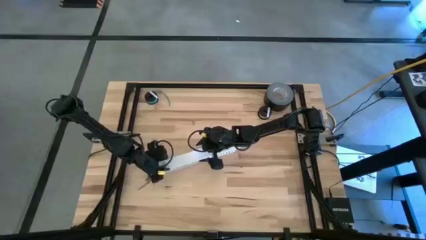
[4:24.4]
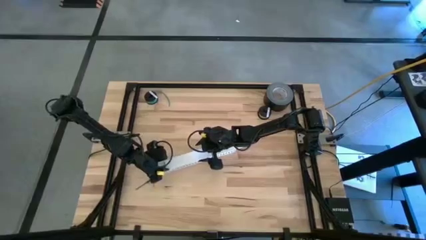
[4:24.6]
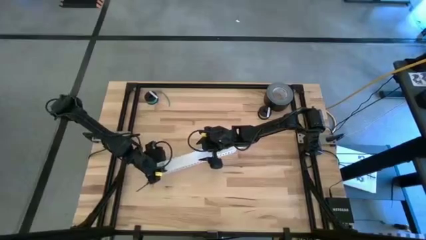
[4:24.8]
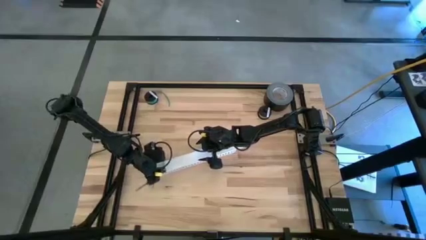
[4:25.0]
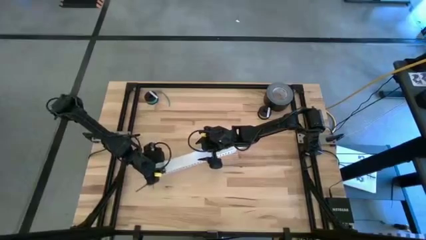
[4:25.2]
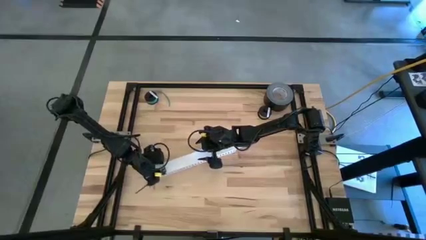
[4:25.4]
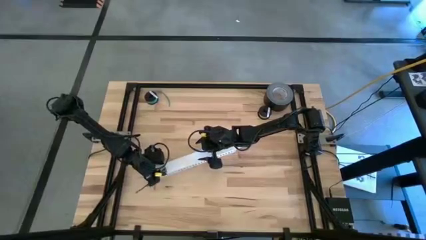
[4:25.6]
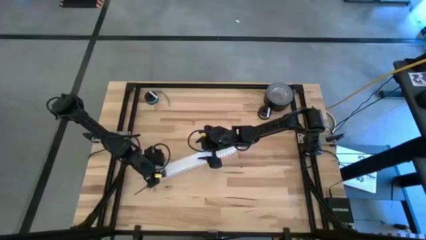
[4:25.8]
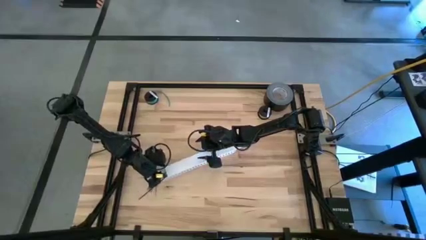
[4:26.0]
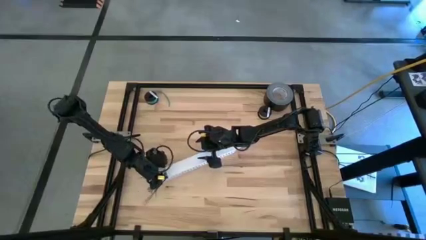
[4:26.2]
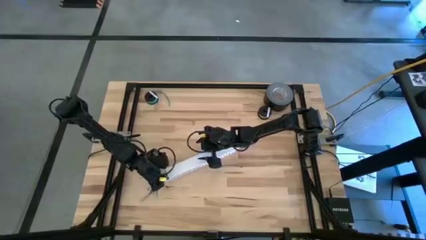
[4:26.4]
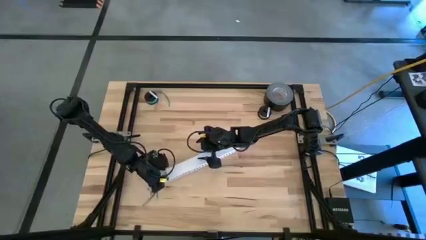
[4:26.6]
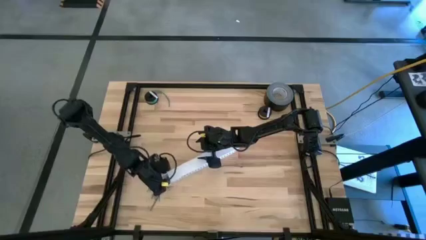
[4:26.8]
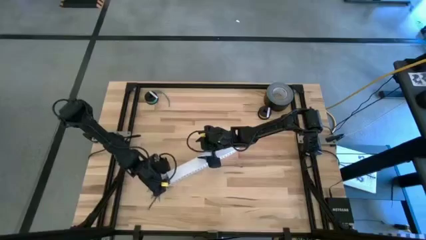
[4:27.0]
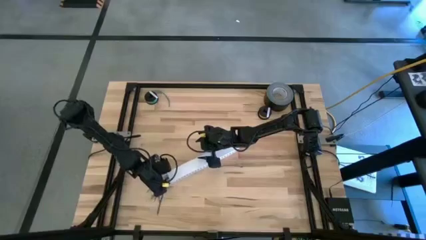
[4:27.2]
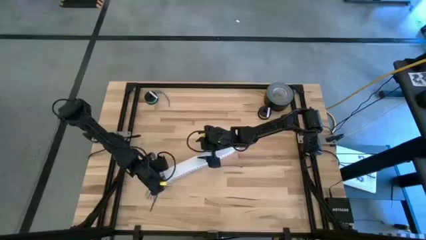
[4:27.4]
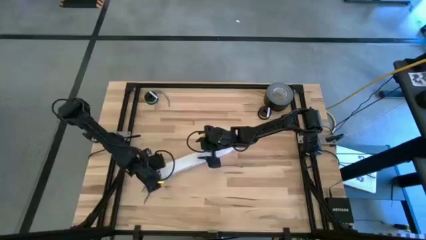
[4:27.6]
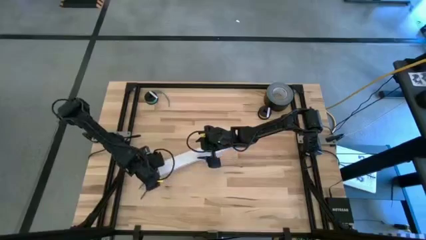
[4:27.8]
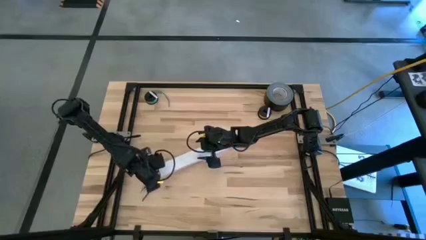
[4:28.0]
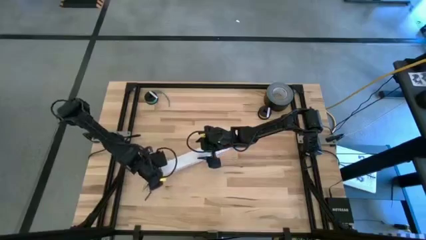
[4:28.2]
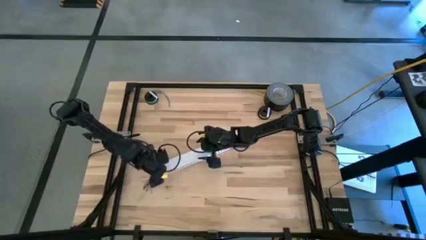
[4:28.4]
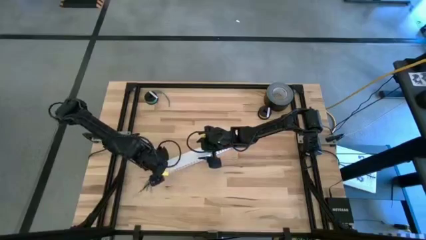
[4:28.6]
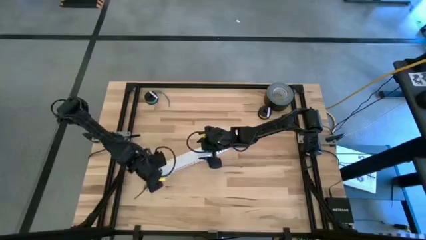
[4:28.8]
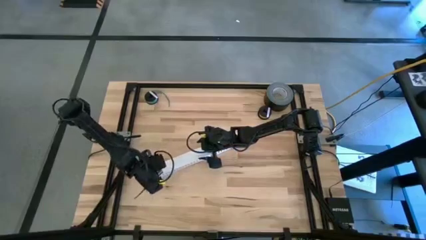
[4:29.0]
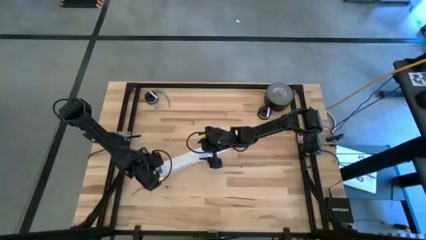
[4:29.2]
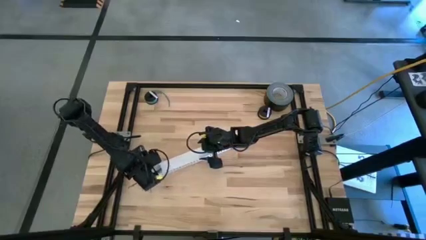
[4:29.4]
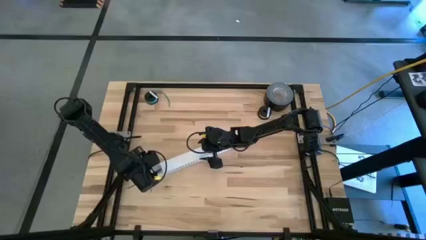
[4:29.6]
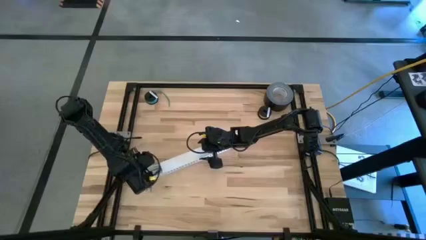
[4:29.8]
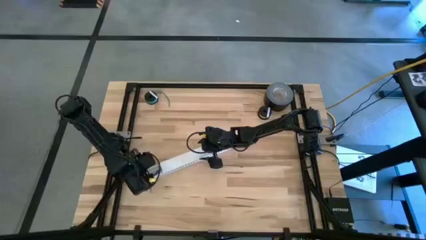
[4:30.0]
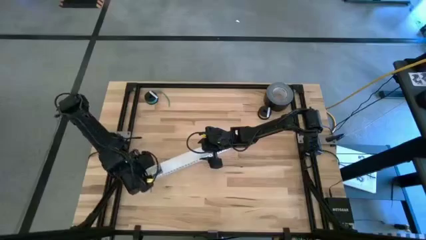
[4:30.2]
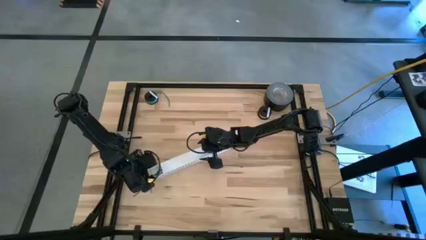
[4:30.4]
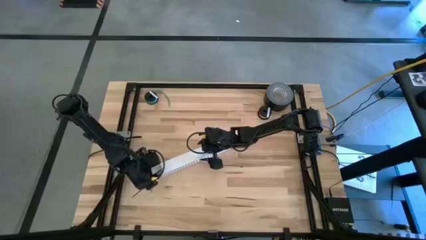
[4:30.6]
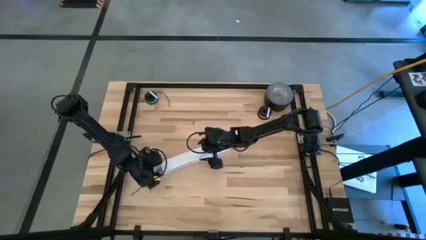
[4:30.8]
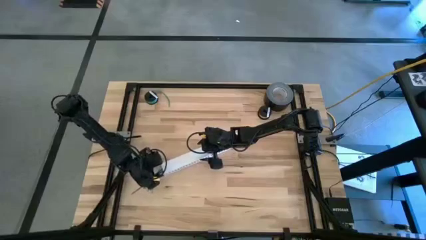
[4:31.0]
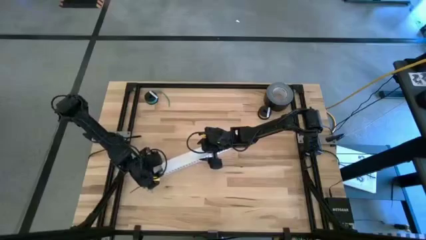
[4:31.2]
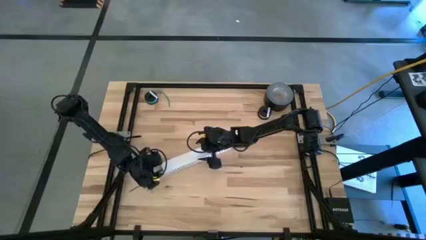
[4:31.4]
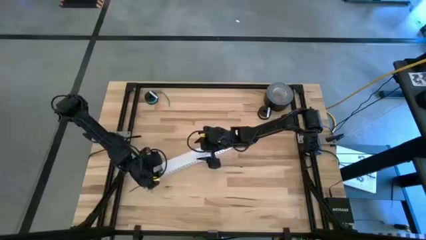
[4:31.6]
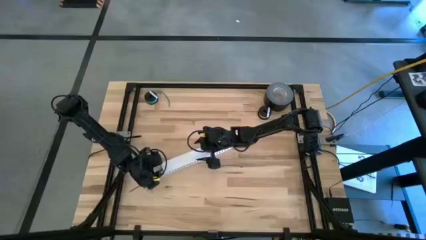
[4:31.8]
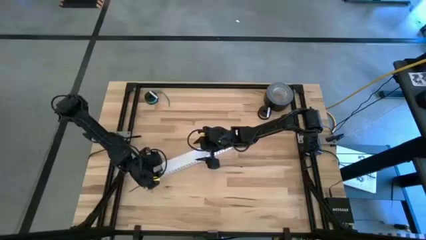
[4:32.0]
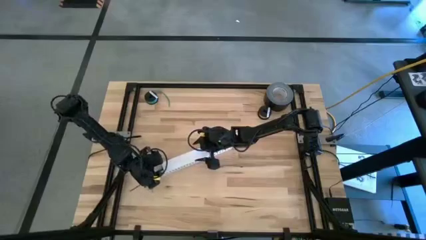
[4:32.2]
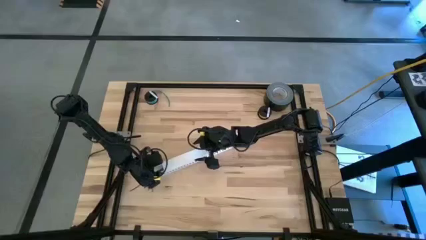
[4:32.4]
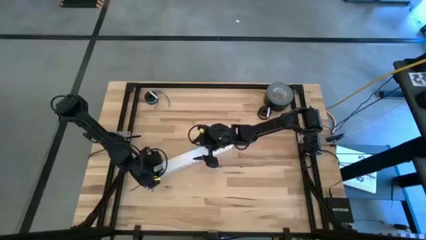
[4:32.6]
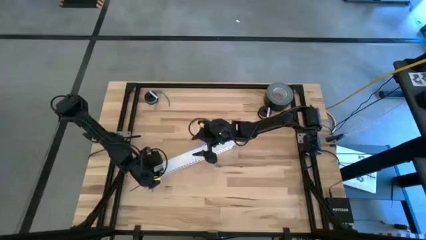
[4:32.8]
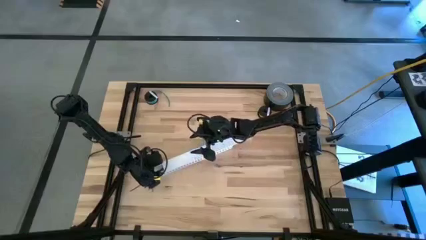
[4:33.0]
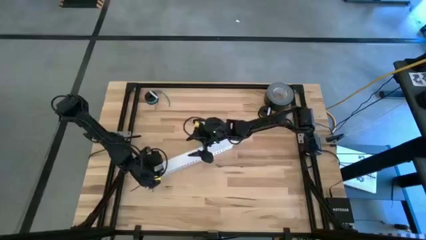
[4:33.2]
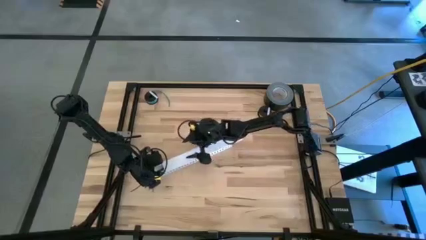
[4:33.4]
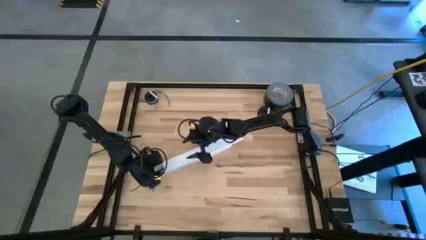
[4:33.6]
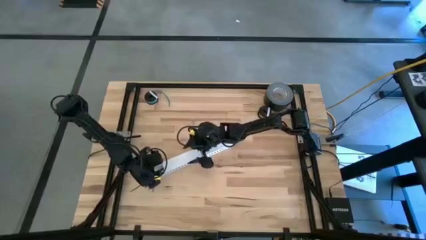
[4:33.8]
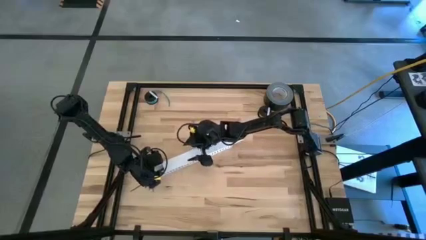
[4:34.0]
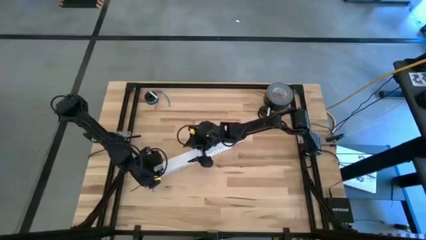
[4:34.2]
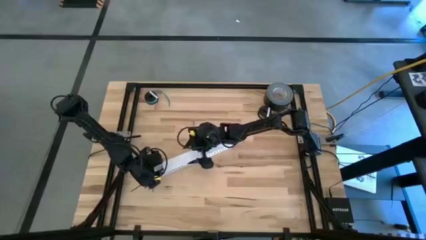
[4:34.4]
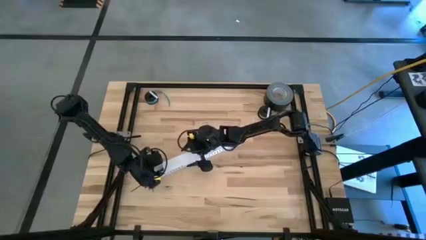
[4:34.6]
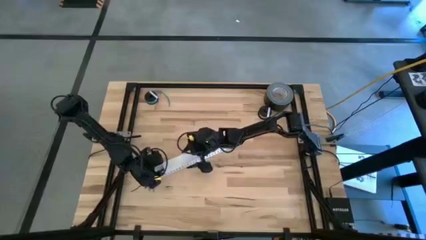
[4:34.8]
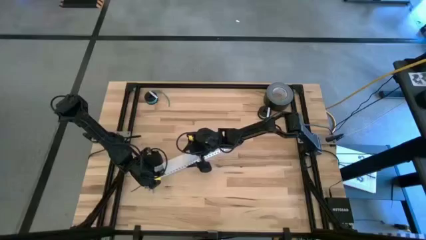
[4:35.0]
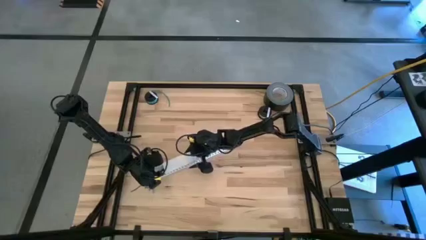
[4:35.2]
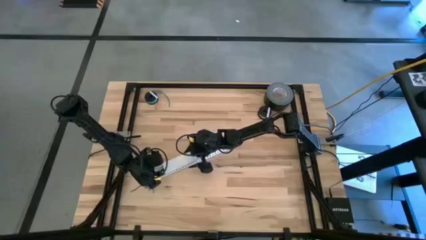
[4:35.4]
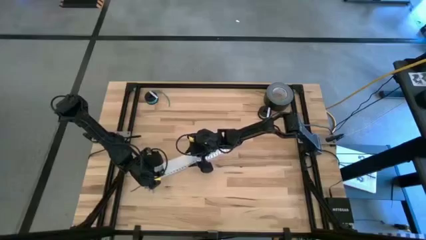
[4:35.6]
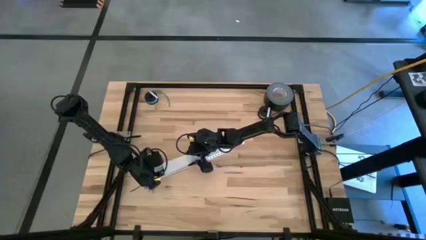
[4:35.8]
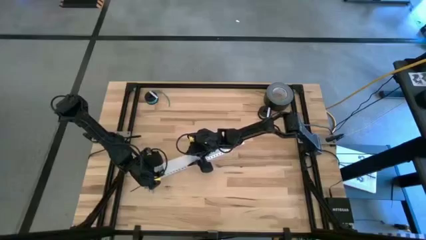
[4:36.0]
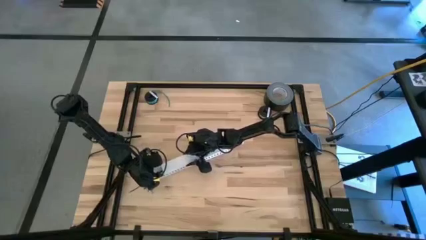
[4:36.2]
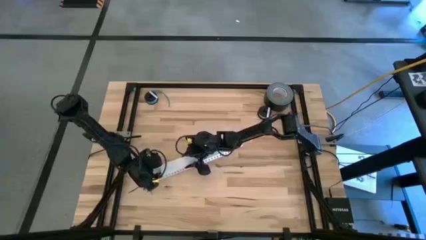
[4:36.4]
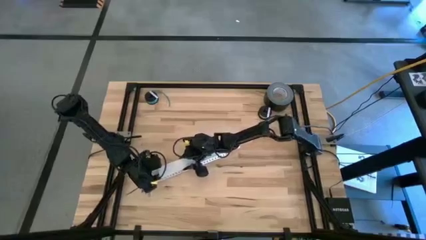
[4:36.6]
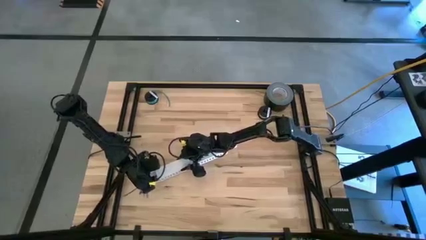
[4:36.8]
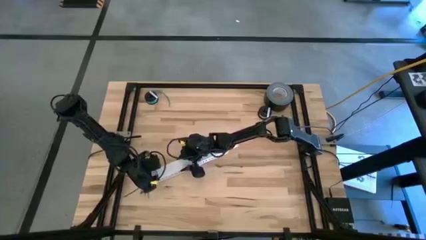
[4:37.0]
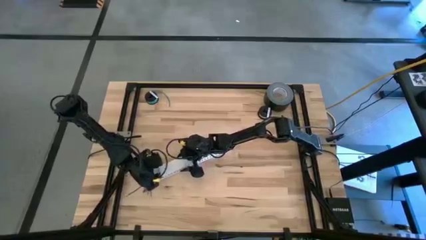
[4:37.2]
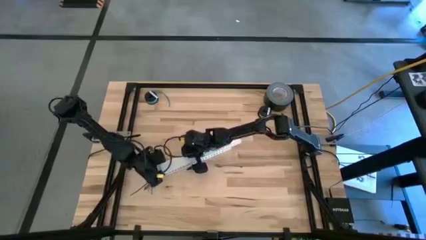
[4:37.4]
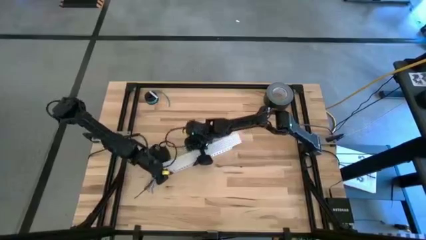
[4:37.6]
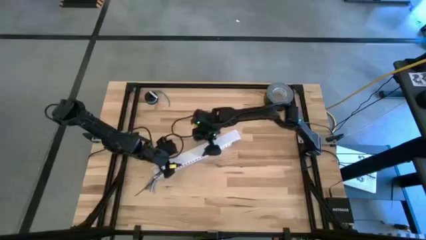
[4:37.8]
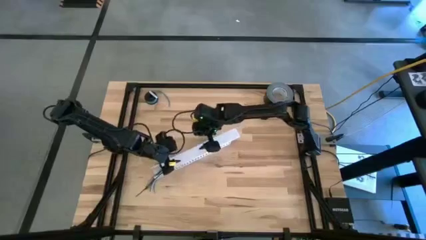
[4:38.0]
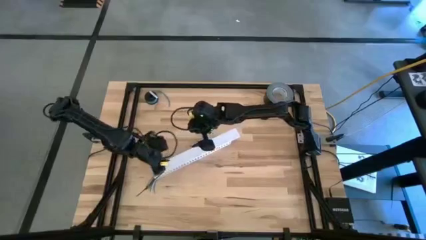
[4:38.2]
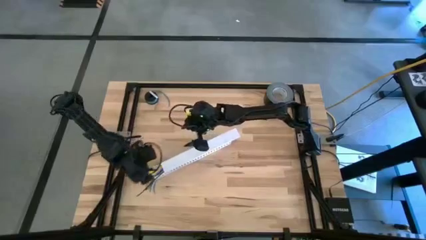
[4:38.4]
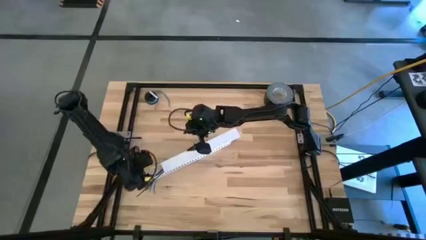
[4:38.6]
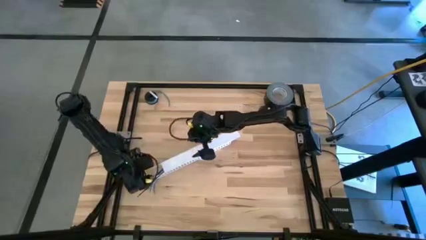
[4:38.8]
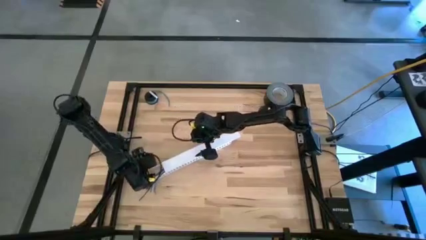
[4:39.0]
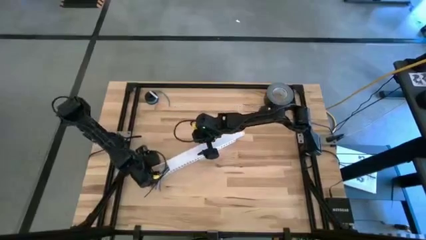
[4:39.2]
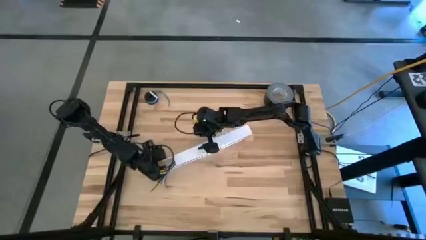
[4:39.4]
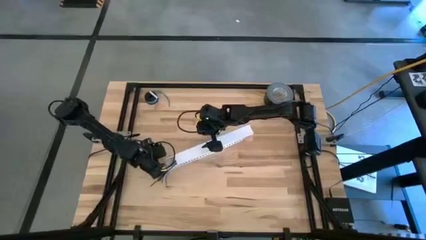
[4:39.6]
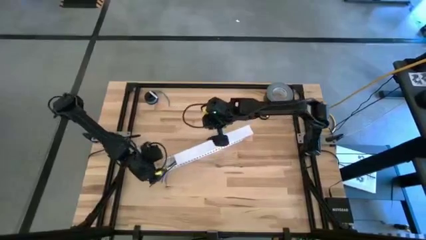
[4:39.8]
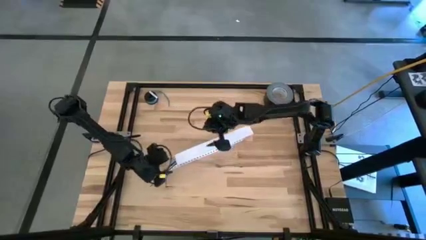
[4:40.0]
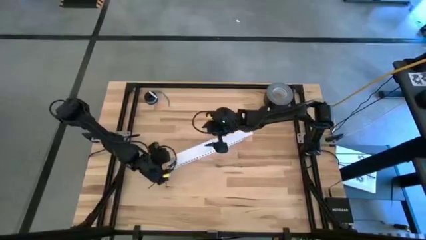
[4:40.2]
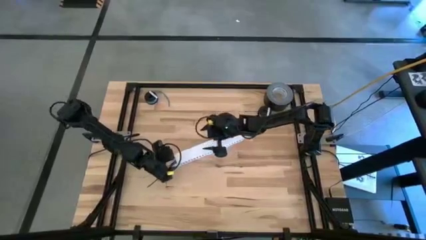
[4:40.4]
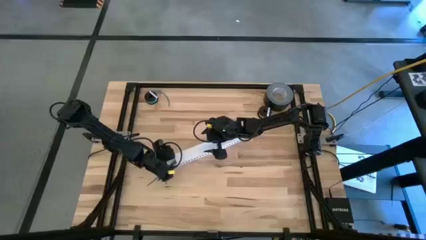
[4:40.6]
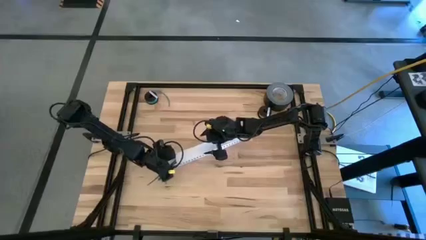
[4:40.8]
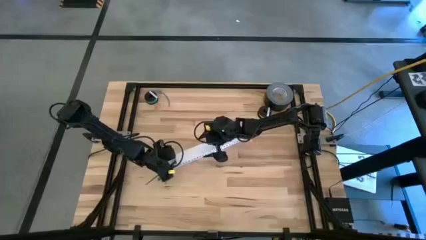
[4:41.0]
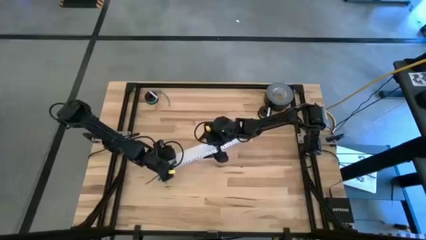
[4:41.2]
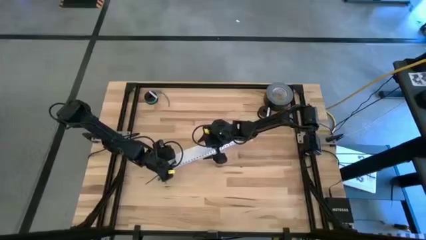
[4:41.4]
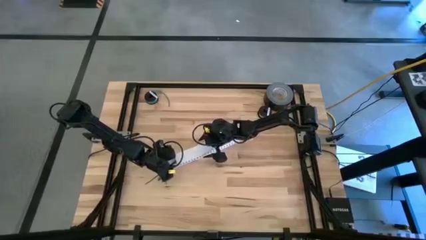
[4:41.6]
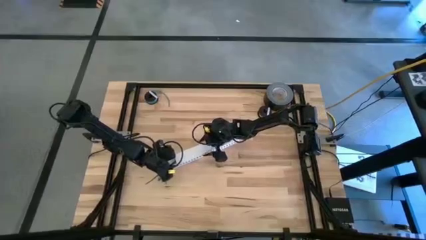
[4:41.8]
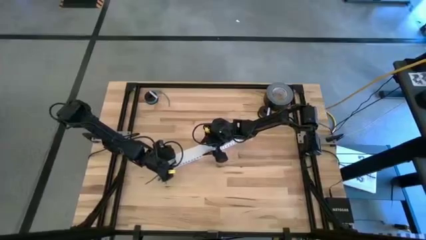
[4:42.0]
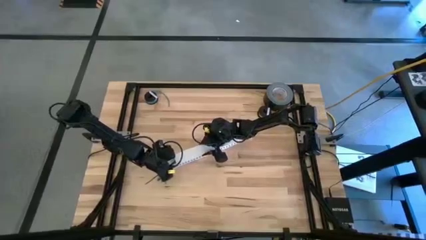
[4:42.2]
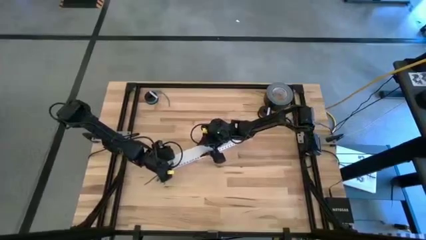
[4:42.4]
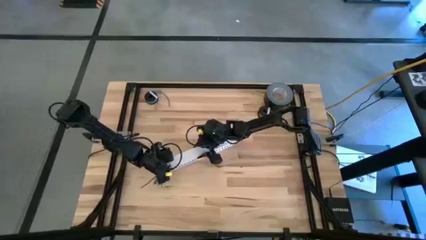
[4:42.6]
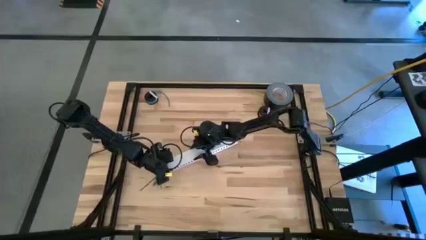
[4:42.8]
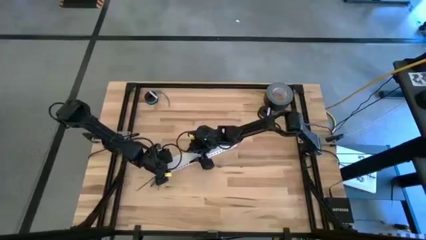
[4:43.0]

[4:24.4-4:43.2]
Task: Ziptie cables
Close the white cable duct
